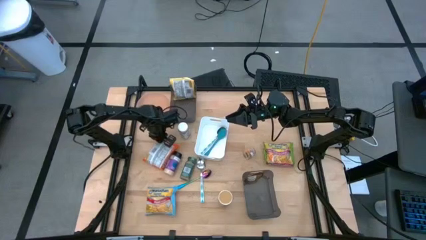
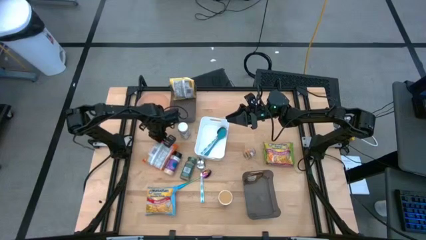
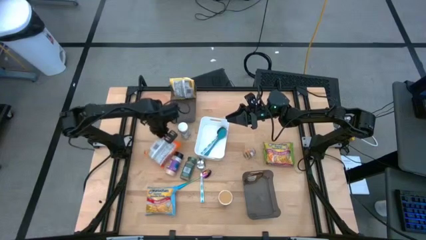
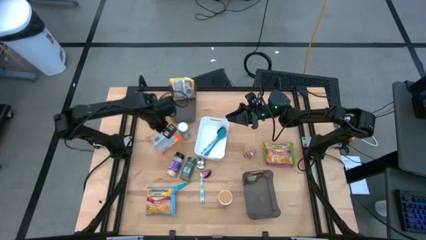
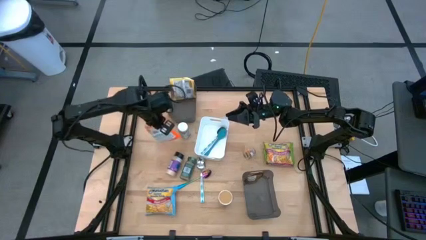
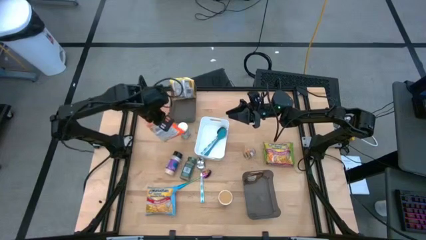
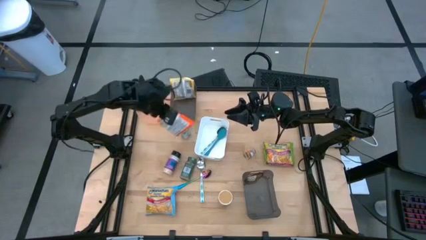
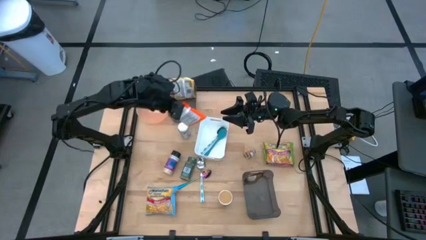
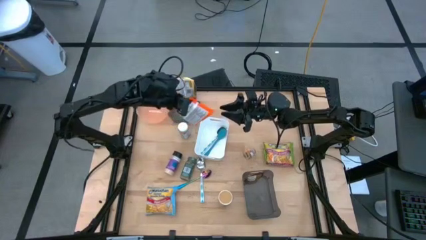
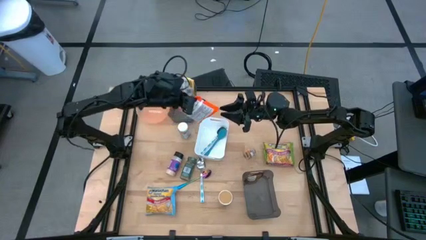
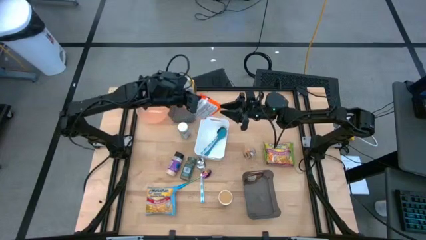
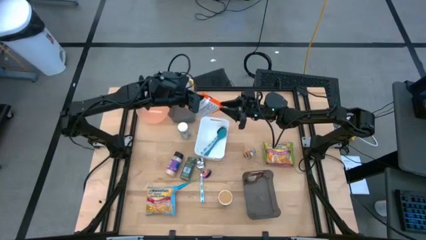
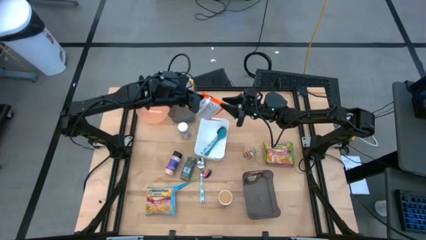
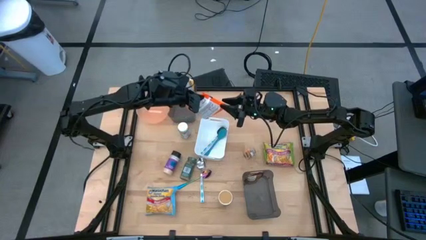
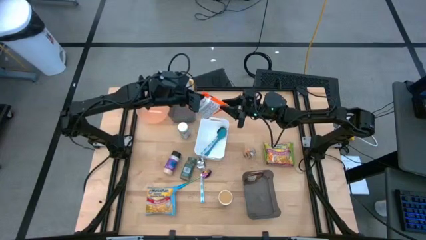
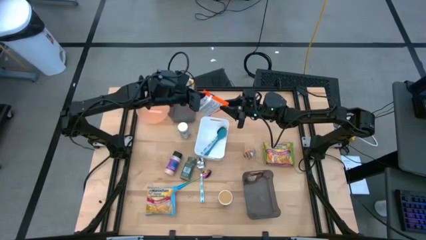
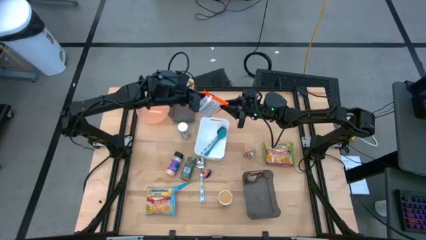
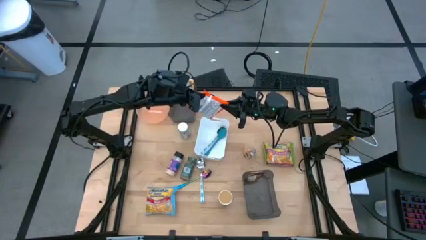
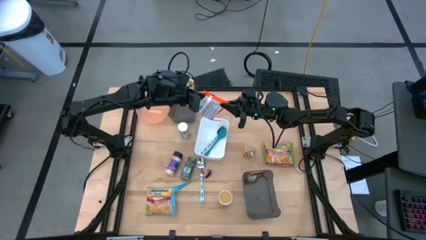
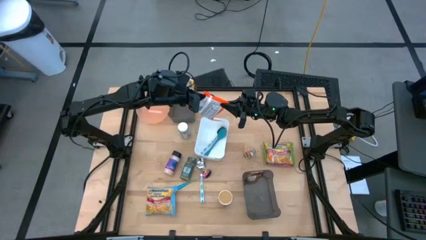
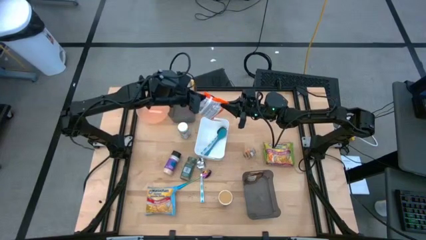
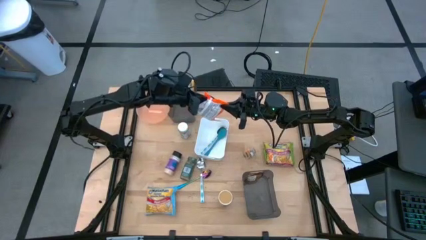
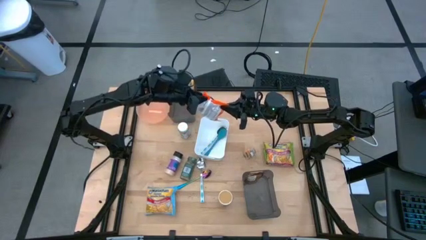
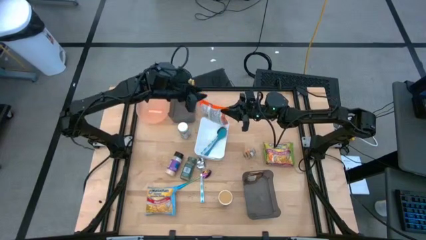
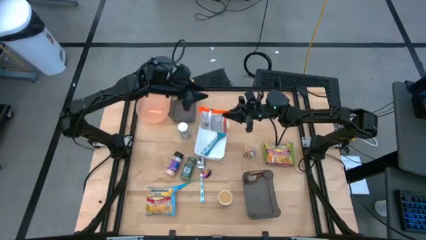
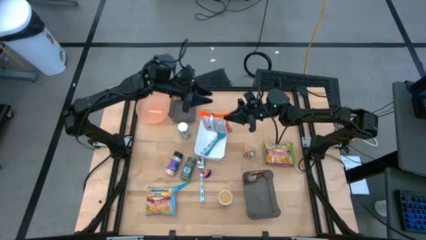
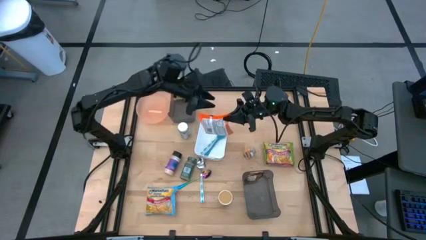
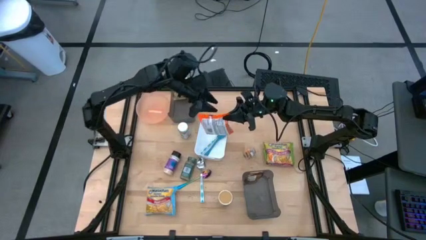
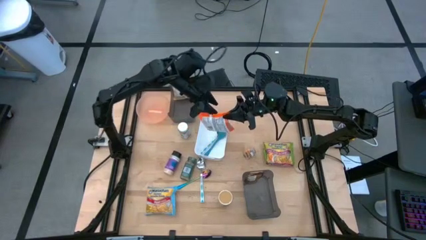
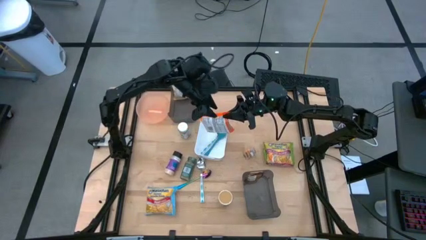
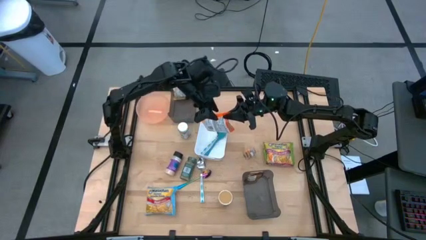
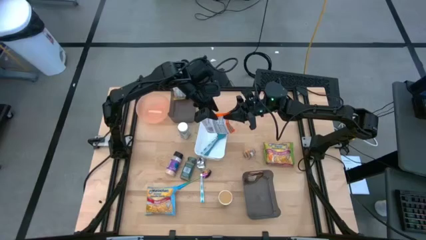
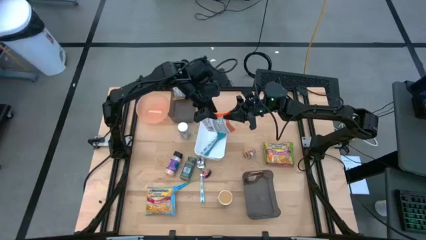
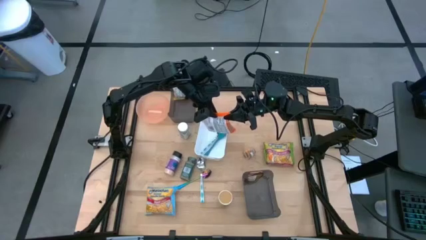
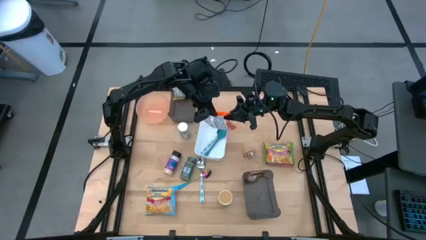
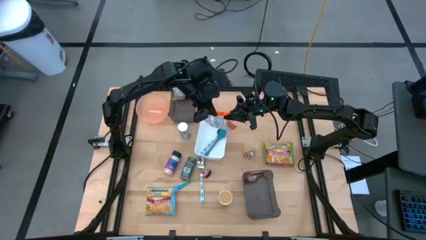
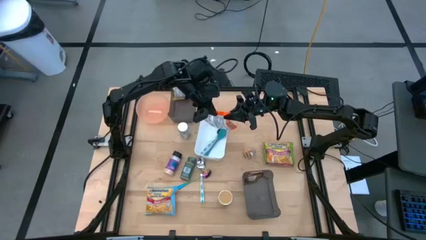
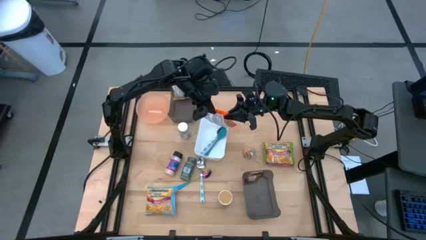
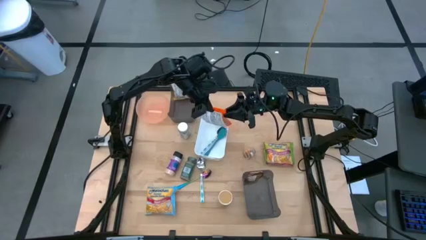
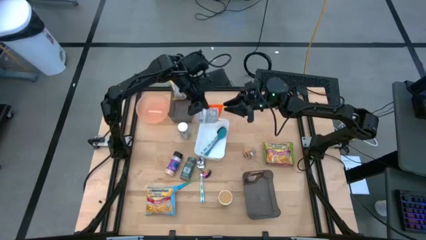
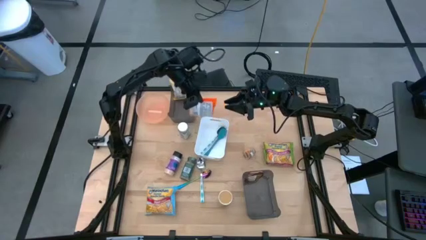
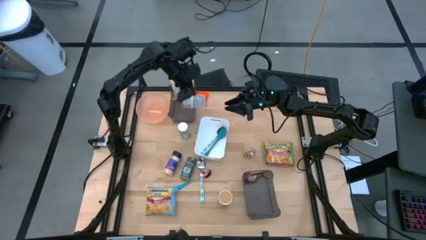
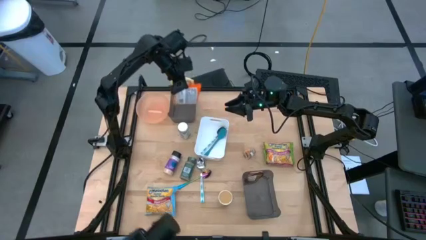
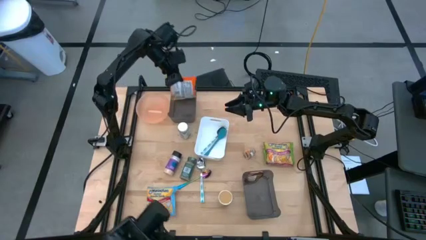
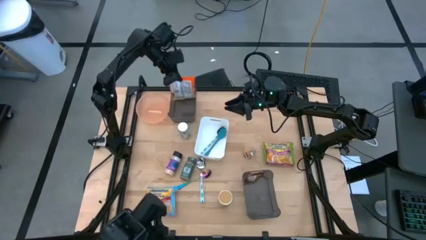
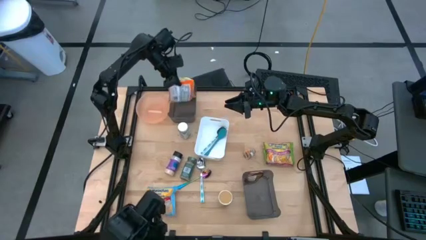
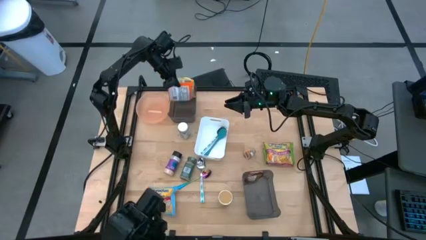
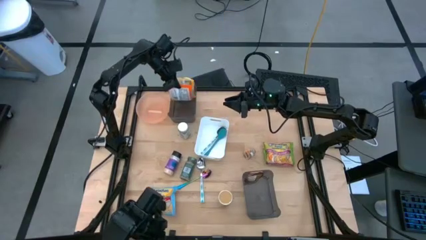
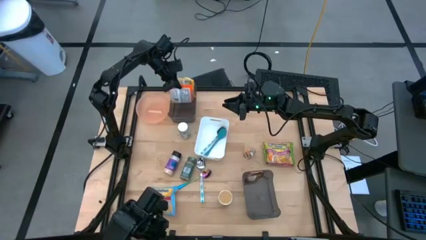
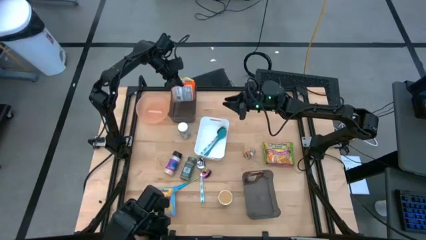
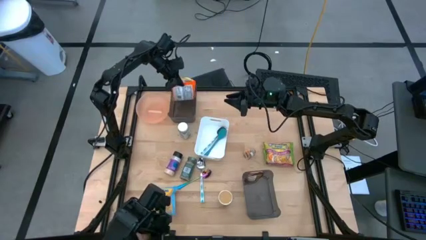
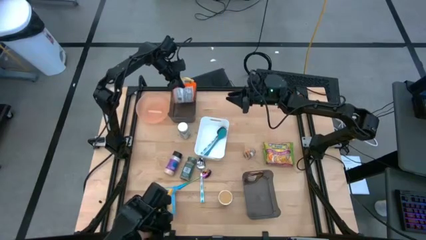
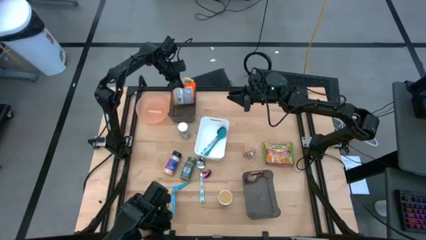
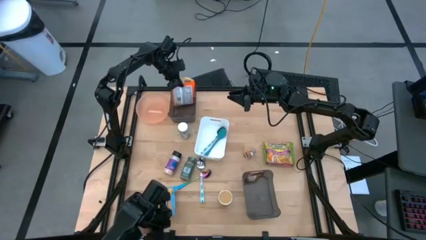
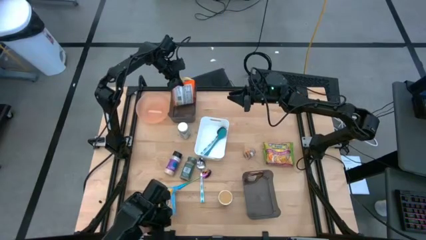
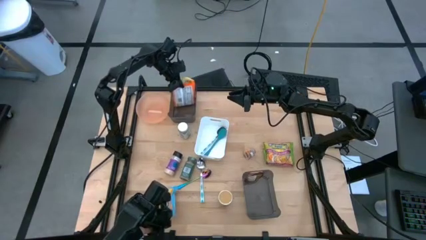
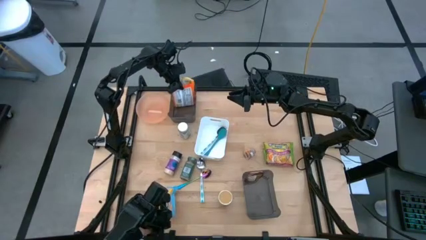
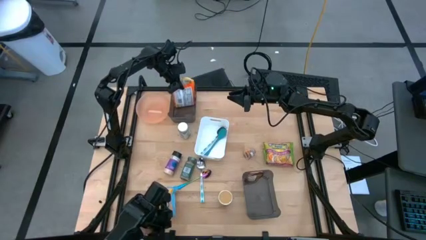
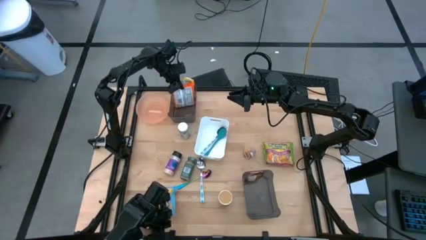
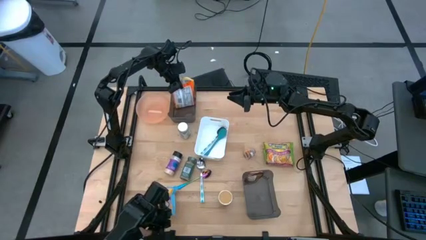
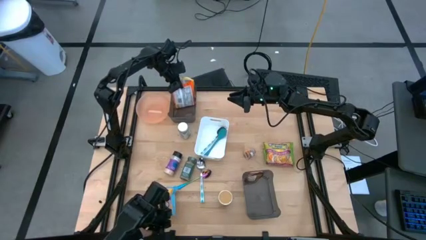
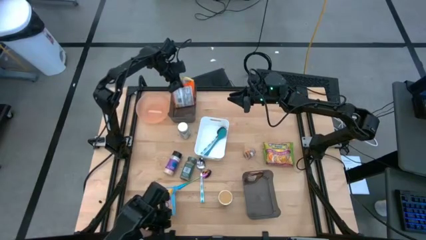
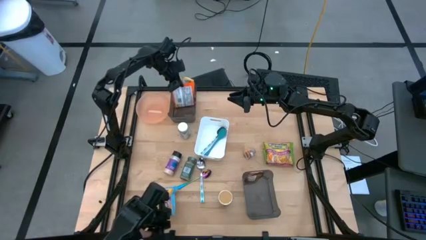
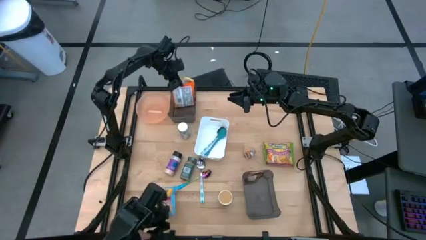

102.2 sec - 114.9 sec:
Task: Pick & Place Food Item
Put the orange noodle pack into the top black bin

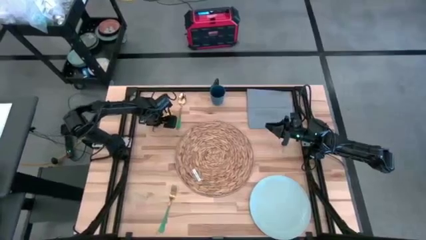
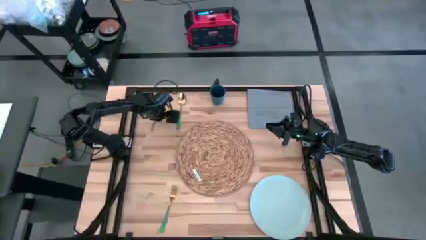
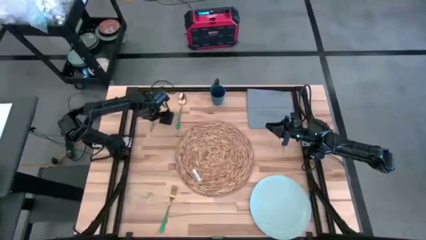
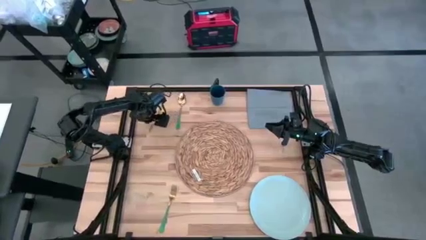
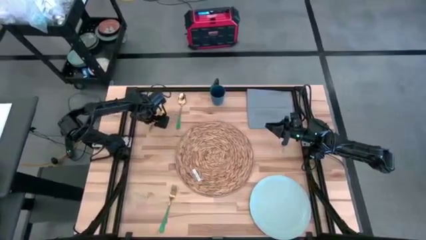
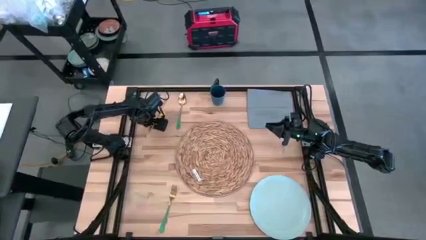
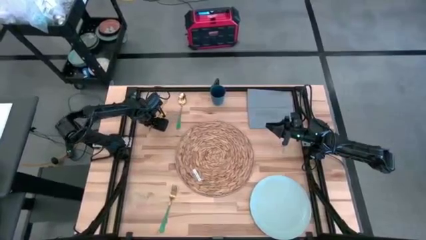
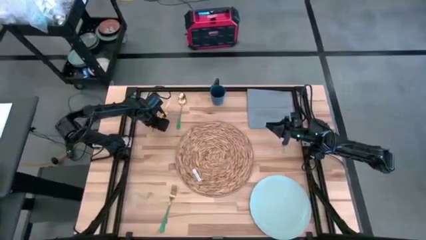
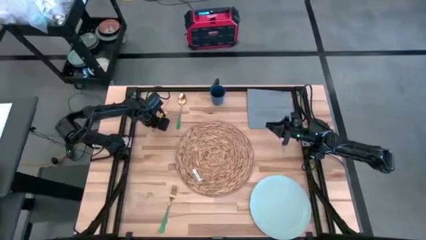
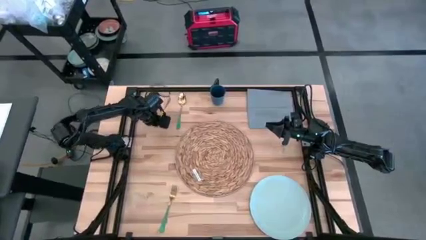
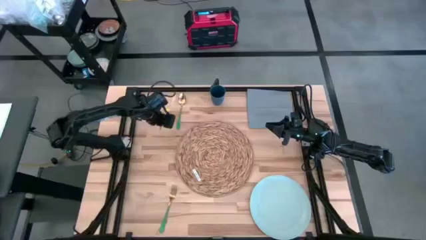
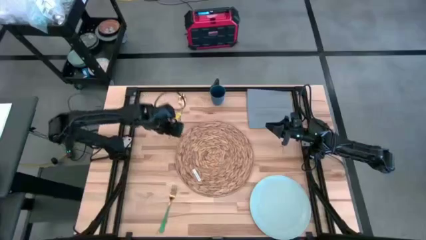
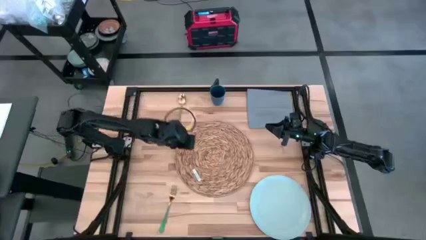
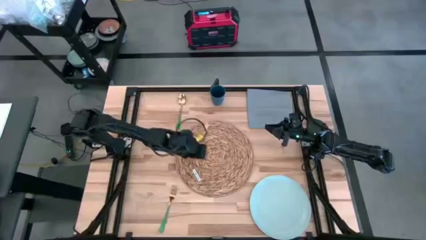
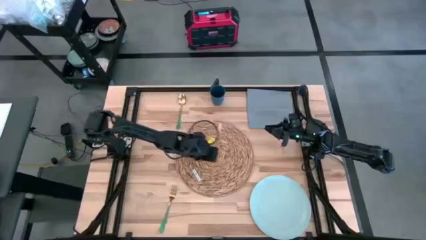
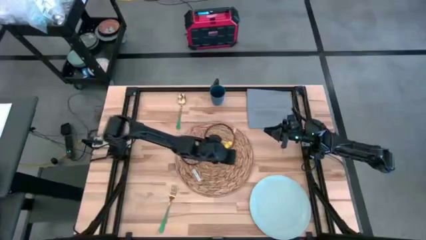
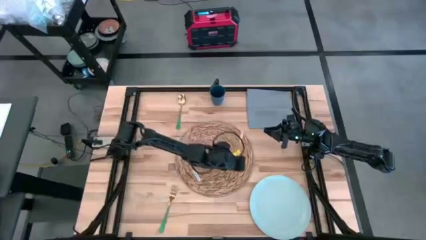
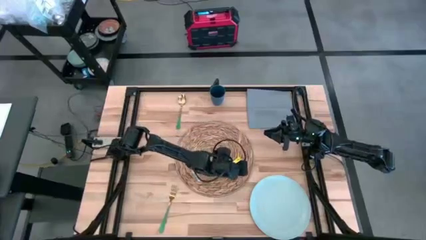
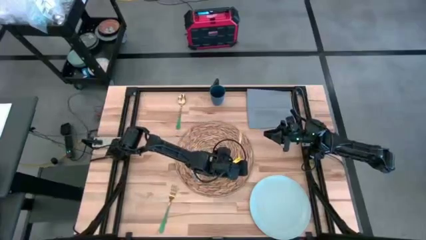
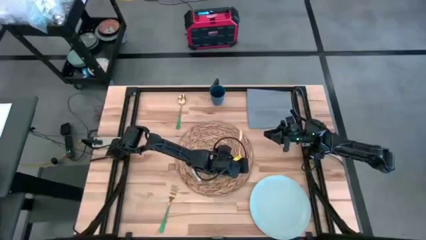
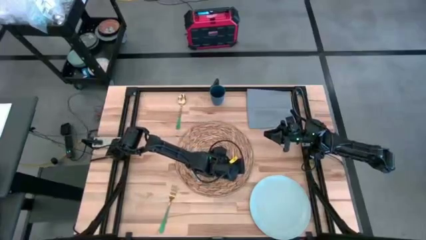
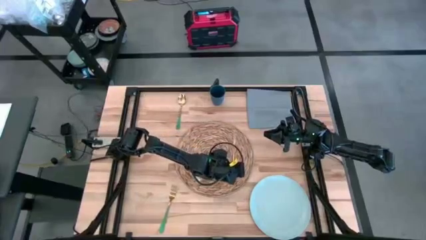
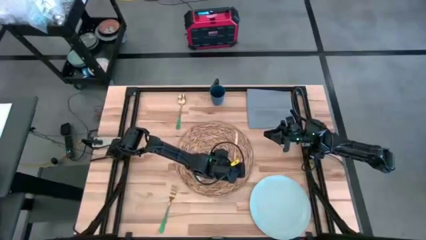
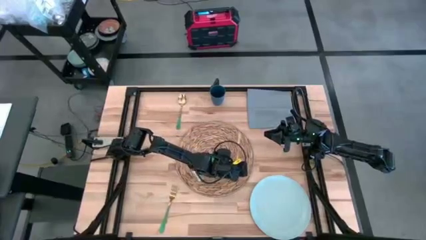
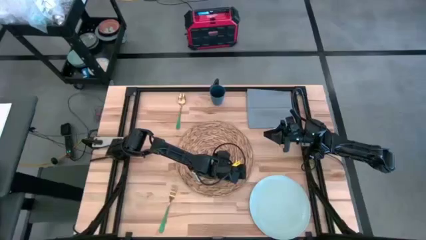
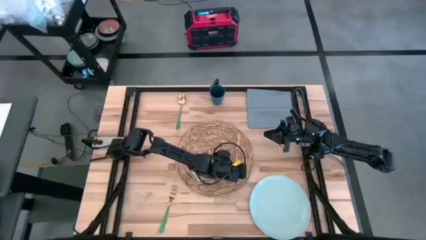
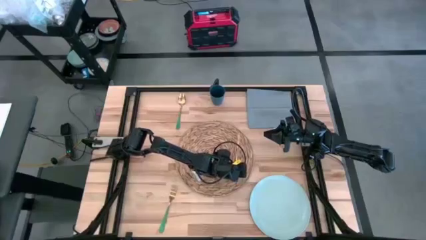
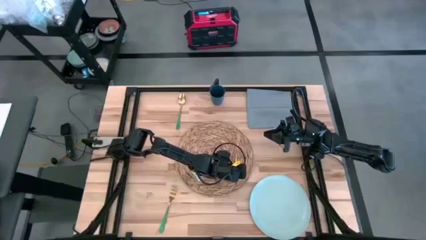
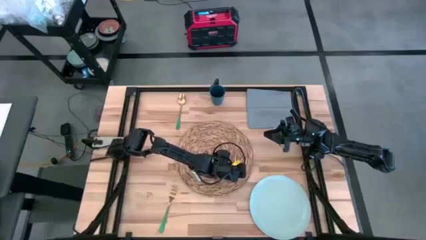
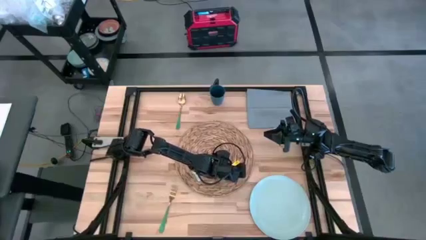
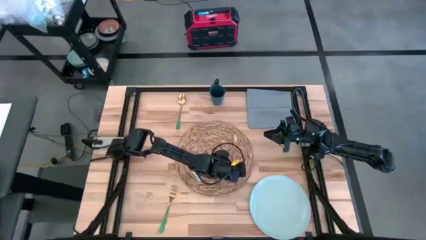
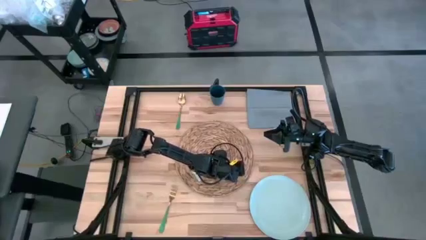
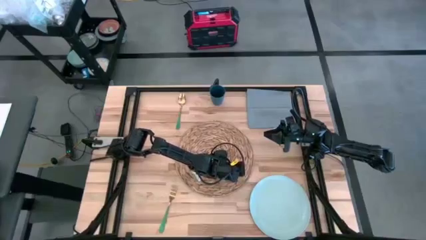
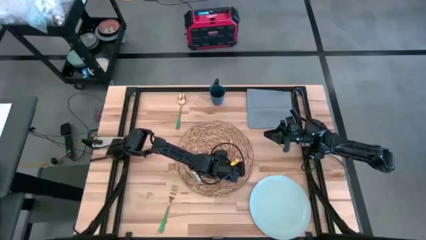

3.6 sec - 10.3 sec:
Task: Set table place
Put the gold table knife on the brown tablemat
